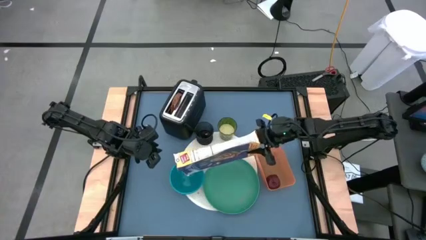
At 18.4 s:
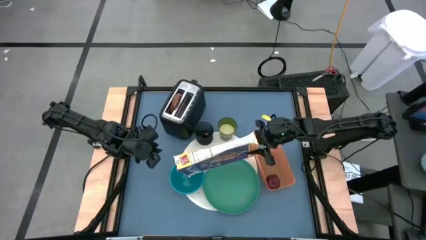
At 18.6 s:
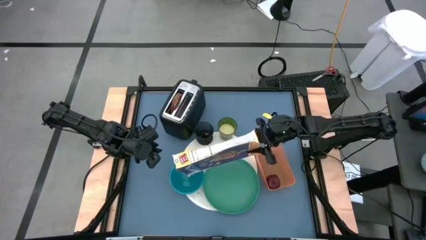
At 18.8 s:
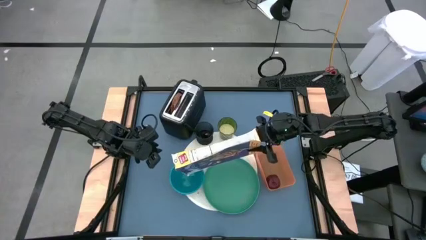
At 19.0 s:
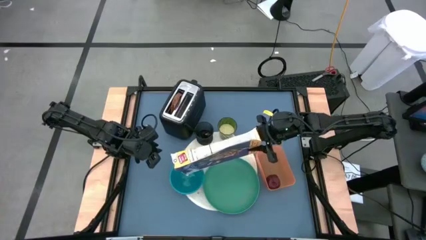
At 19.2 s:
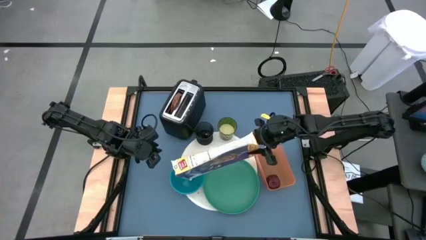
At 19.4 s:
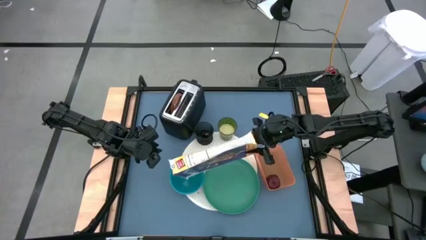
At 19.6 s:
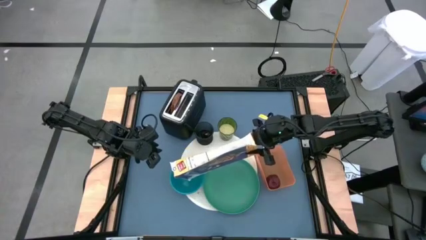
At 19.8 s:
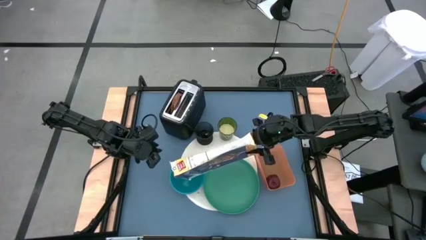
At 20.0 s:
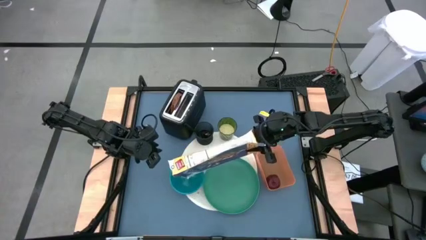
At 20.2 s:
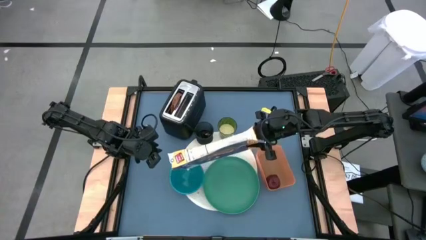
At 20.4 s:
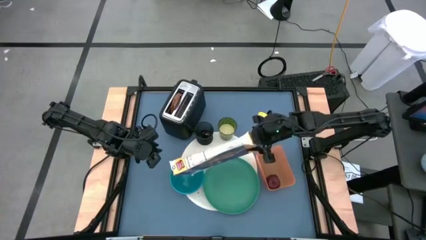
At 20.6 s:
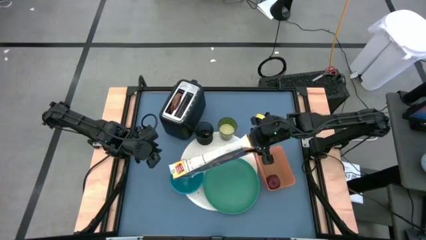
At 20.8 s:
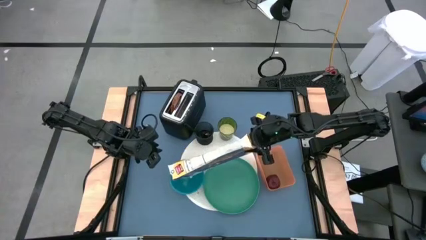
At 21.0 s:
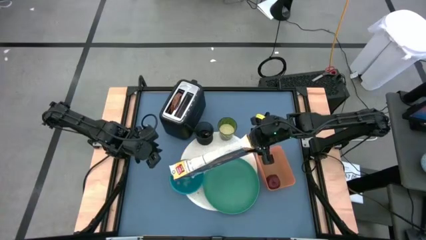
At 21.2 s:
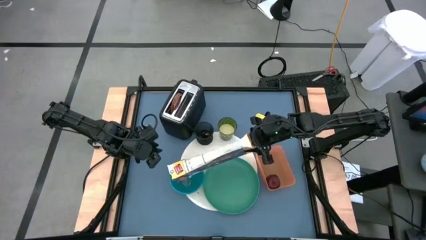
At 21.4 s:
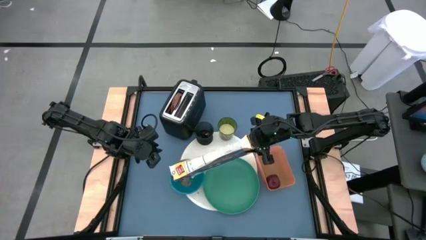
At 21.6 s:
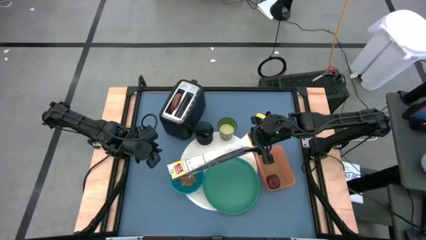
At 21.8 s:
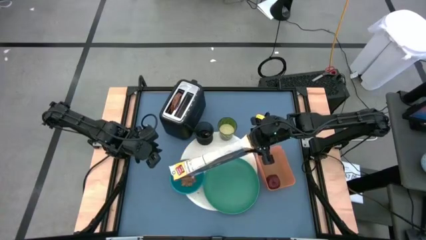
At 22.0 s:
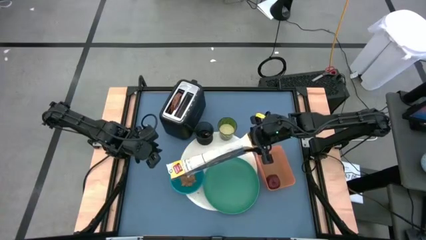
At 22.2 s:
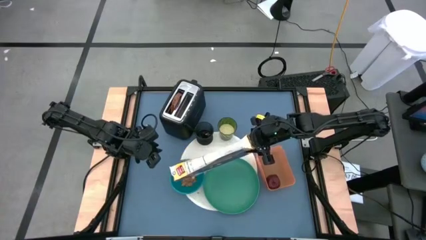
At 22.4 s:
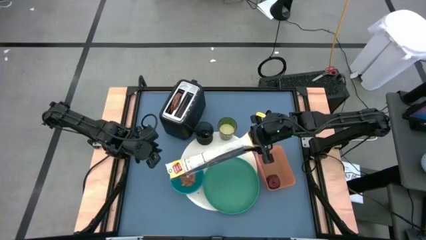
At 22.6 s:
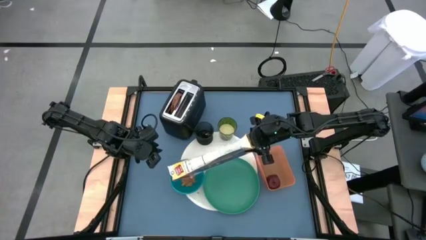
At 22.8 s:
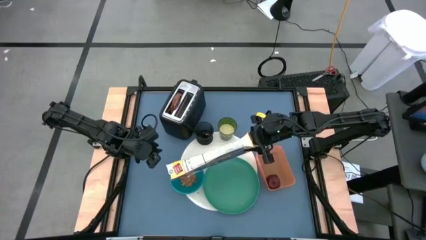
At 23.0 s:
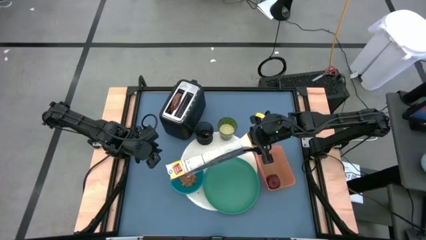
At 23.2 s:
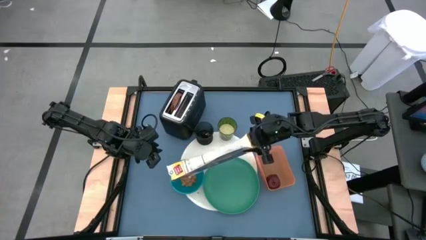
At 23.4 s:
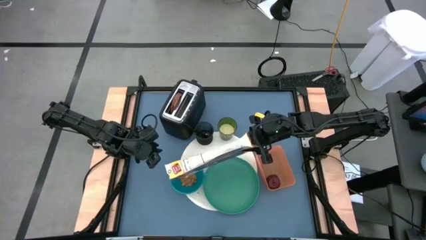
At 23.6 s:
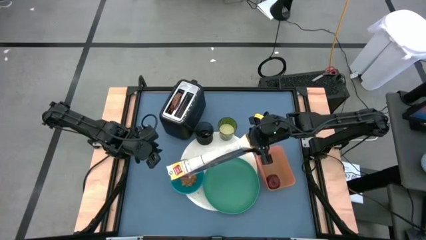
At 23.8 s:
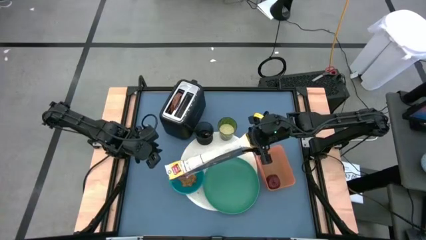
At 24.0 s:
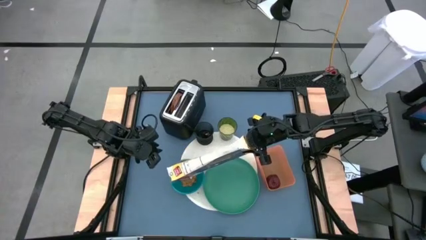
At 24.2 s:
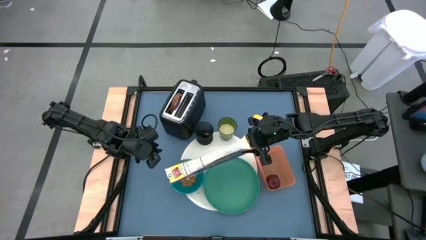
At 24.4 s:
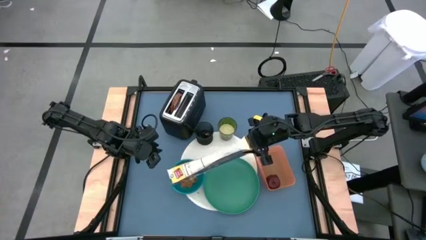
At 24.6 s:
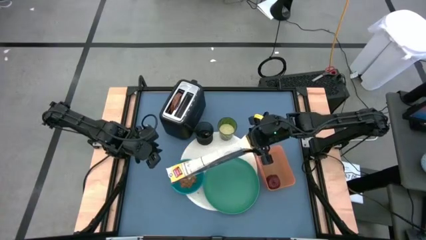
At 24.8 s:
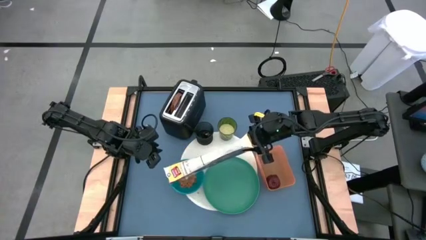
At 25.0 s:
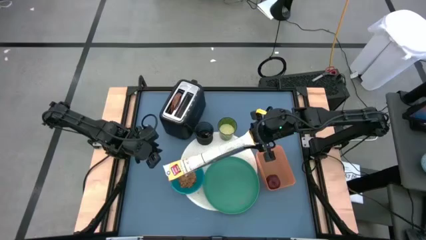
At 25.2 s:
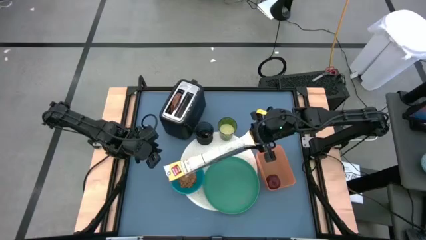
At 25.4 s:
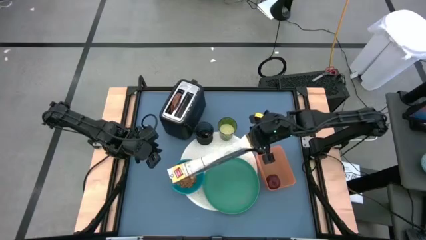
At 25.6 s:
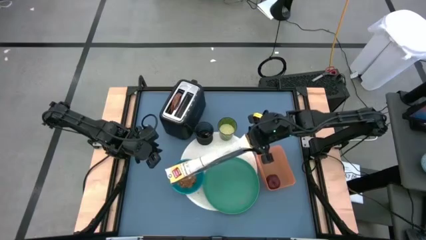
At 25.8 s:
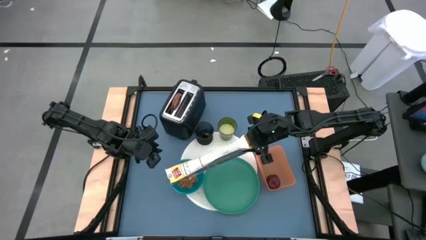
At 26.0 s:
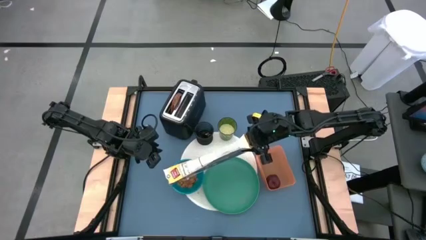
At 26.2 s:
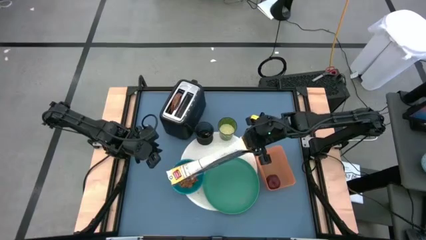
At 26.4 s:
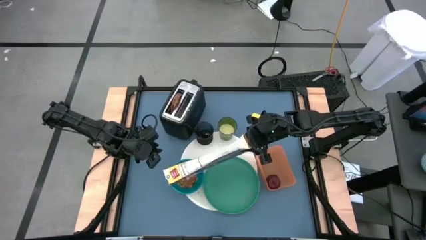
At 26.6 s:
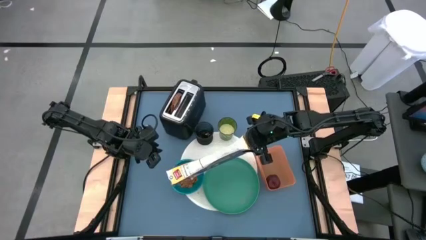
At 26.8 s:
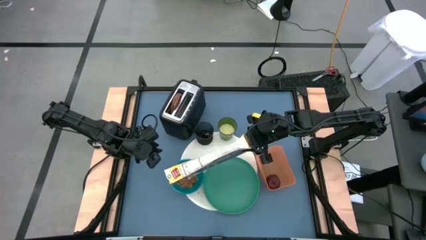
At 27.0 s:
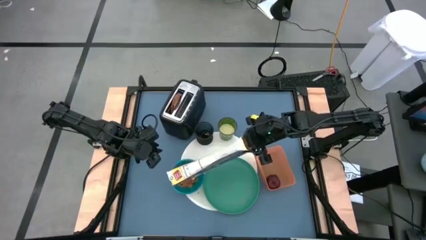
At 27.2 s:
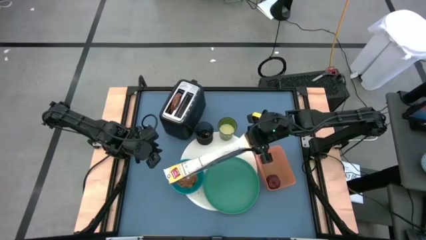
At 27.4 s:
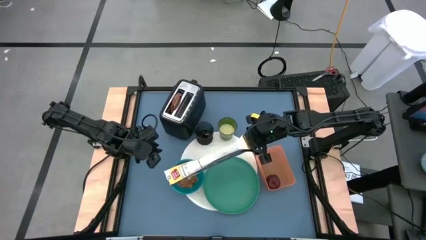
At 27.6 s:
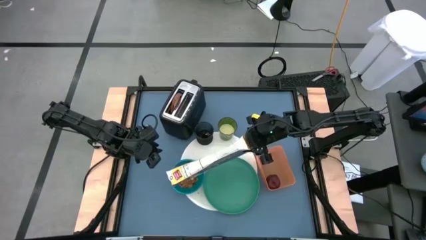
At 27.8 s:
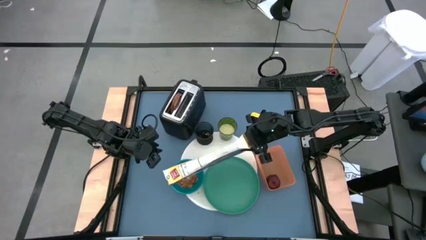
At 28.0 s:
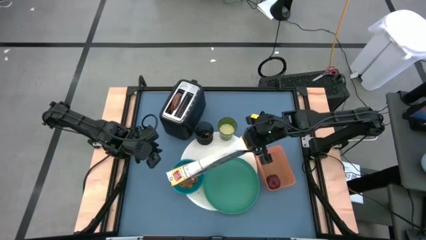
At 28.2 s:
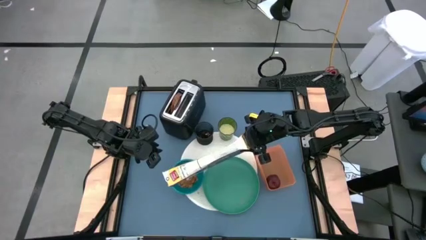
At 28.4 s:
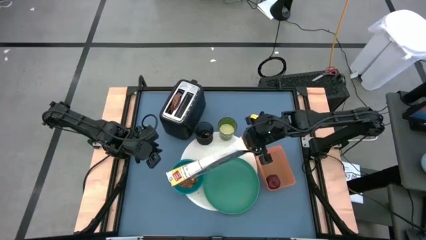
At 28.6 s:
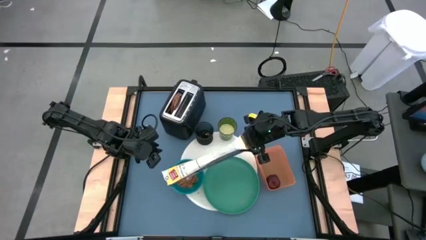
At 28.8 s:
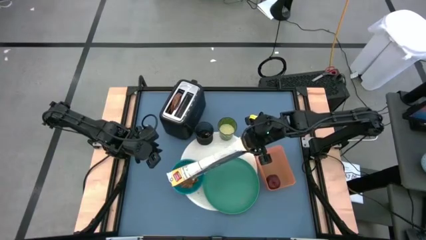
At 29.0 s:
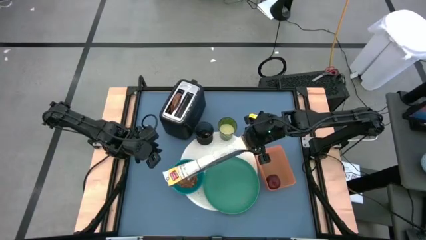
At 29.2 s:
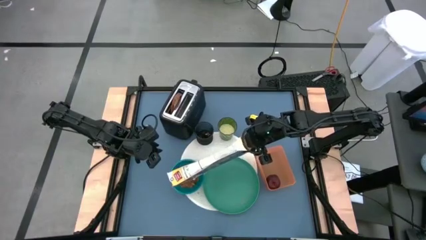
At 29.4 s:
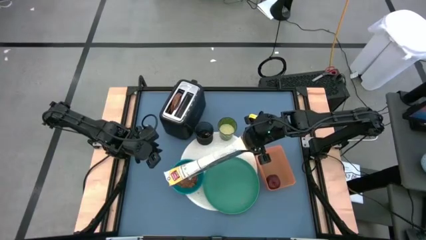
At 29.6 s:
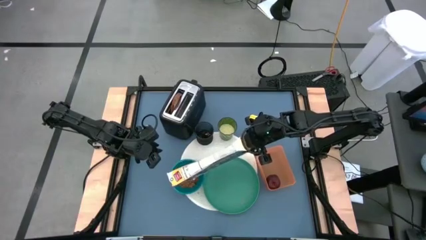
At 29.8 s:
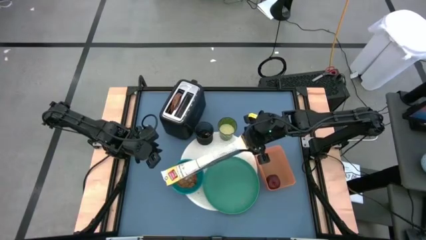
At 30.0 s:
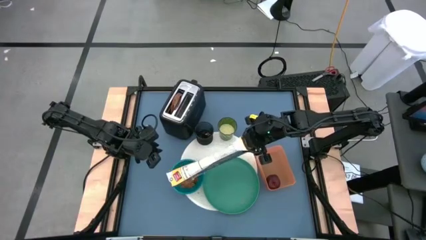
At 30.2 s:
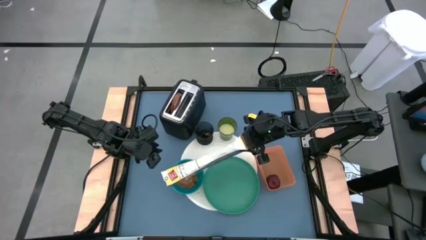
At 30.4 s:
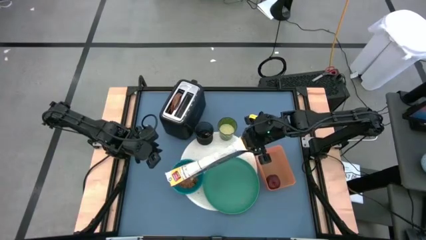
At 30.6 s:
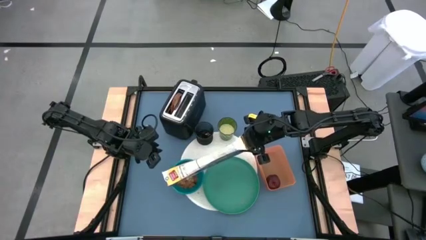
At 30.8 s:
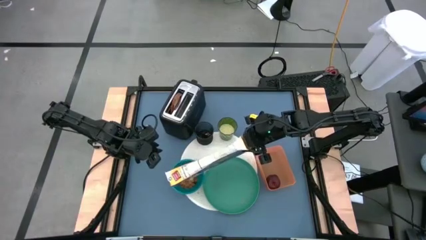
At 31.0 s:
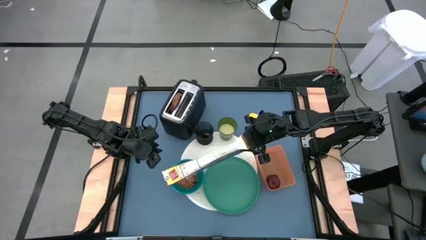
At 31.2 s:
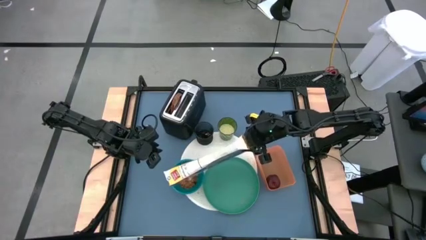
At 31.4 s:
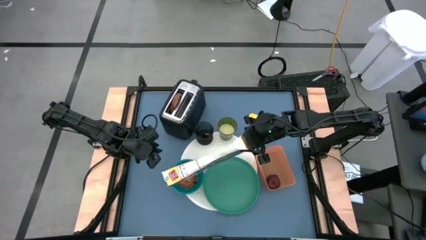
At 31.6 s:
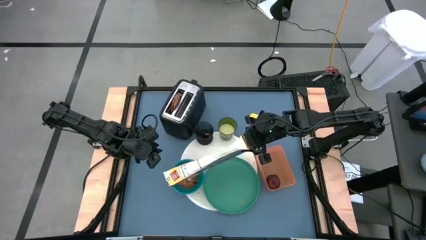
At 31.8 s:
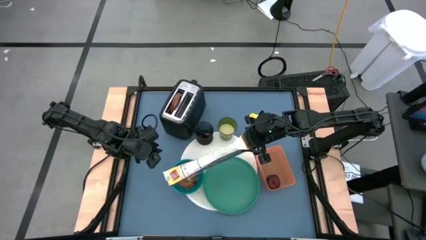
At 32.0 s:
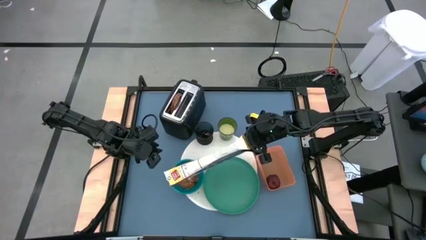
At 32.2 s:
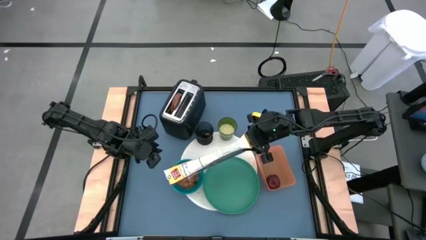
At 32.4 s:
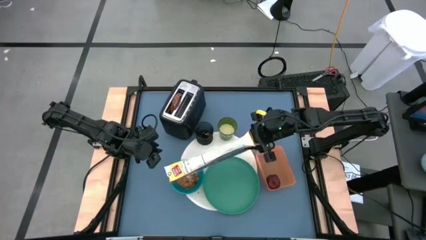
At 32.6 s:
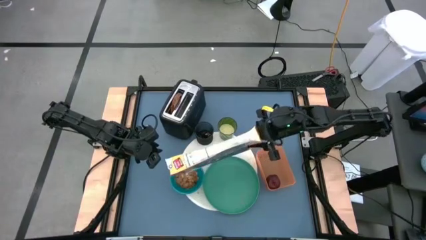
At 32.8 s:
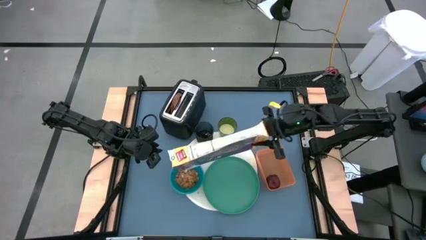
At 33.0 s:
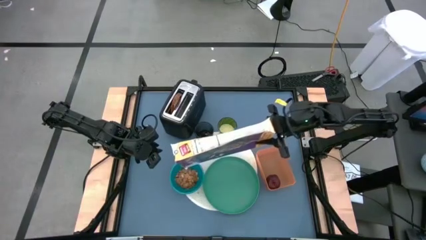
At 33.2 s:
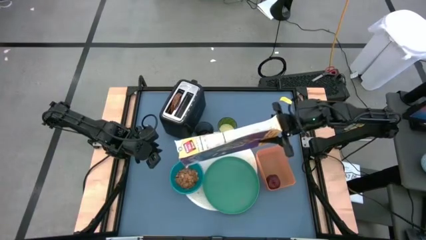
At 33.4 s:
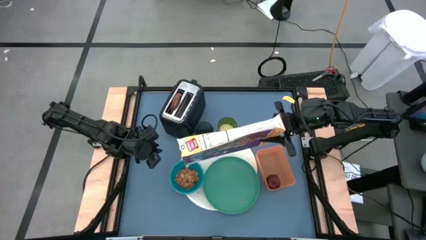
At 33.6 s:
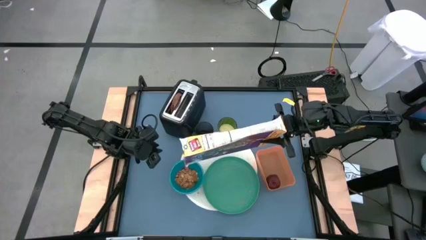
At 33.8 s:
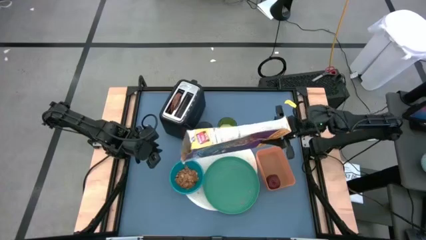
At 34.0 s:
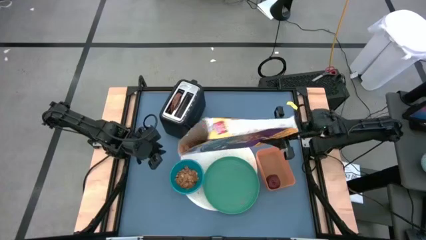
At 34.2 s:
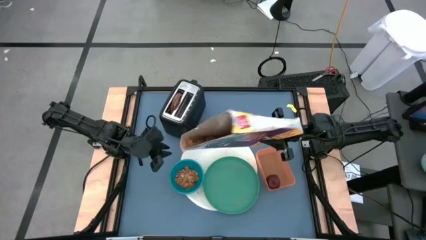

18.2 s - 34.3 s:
Task: Arrange a breakfast setting
Pour the cereal from the purple cereal box into the blue bowl
